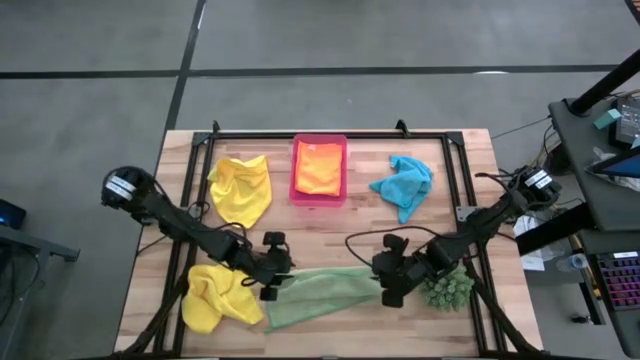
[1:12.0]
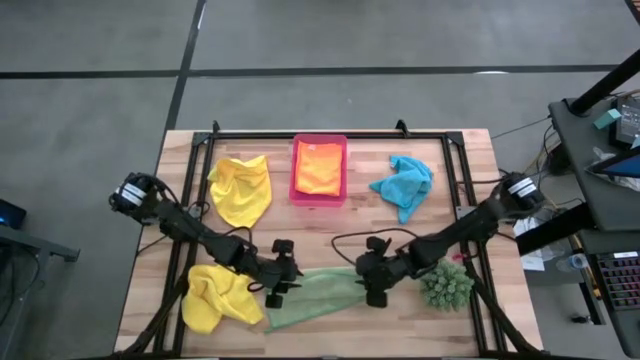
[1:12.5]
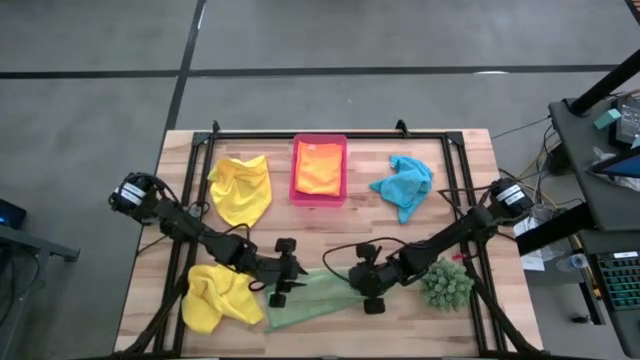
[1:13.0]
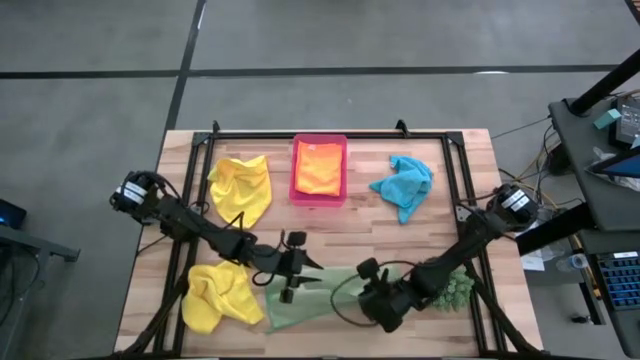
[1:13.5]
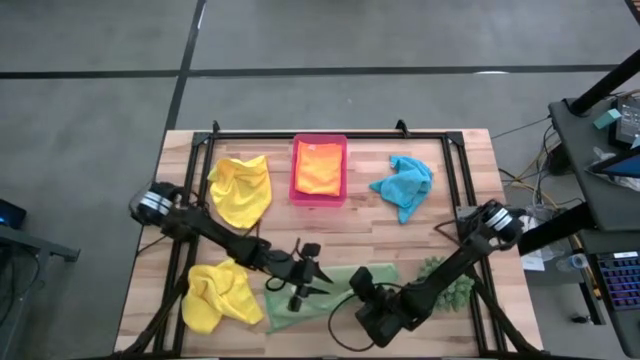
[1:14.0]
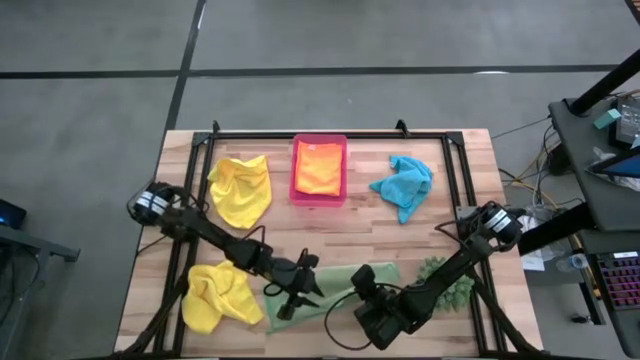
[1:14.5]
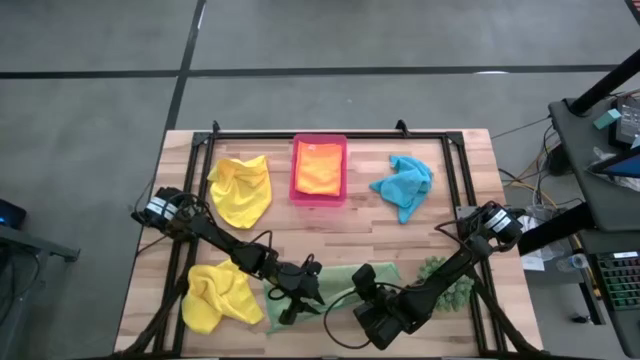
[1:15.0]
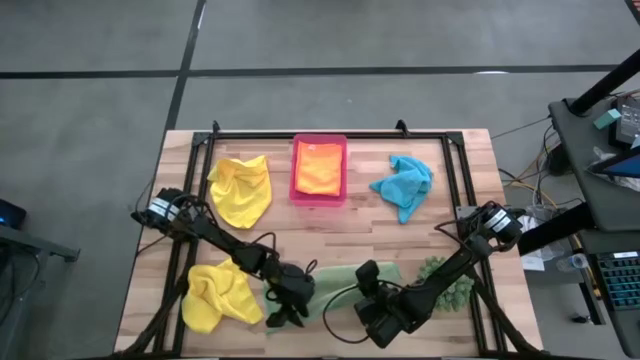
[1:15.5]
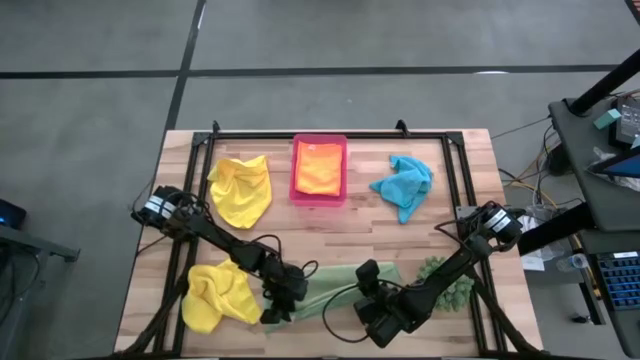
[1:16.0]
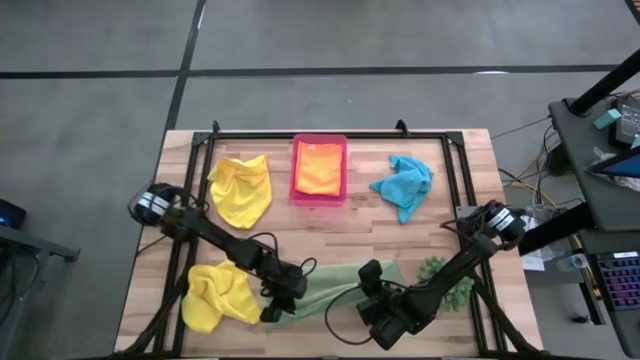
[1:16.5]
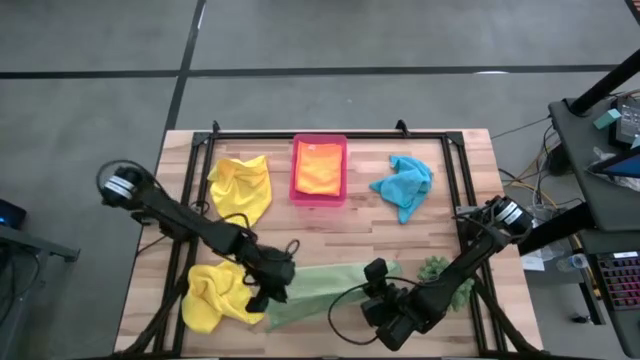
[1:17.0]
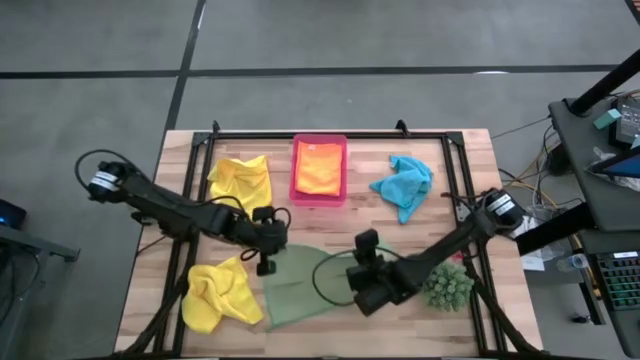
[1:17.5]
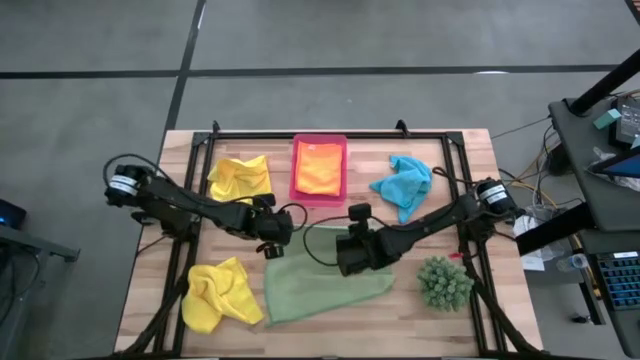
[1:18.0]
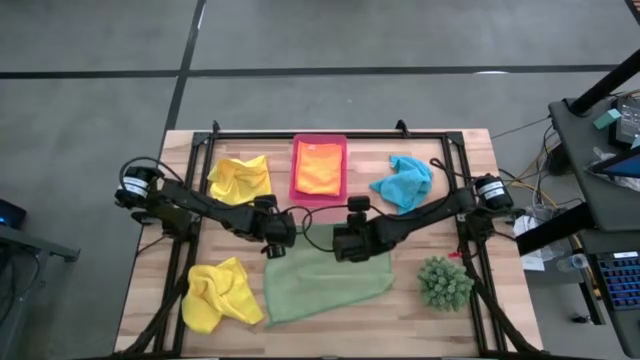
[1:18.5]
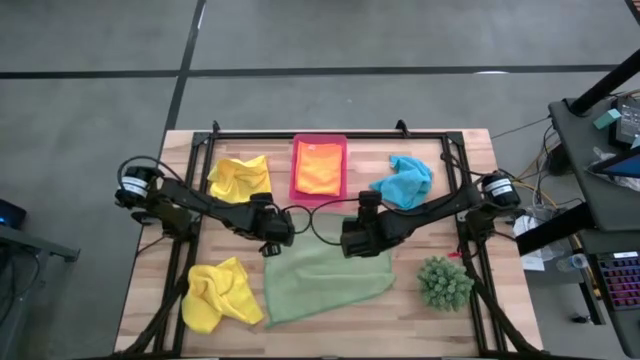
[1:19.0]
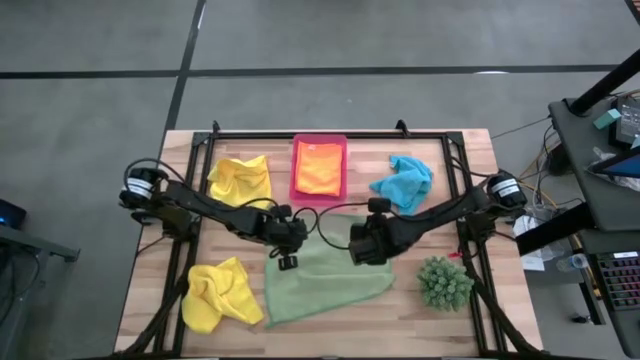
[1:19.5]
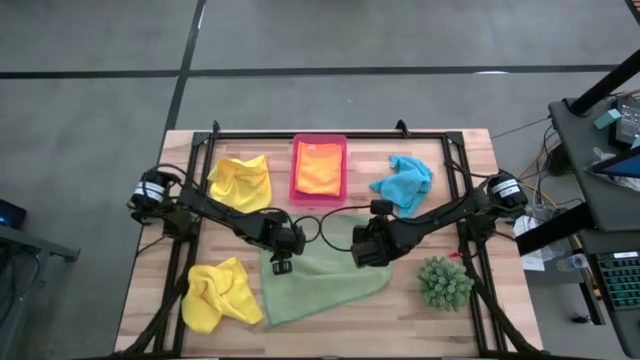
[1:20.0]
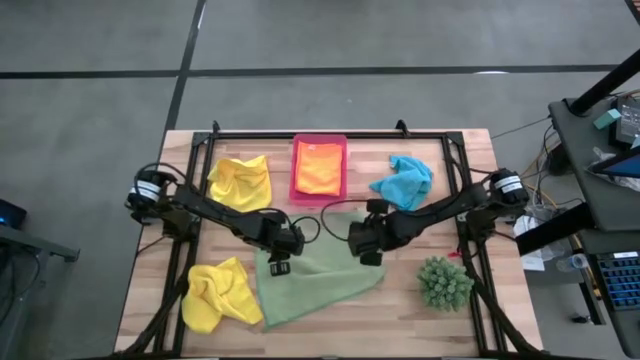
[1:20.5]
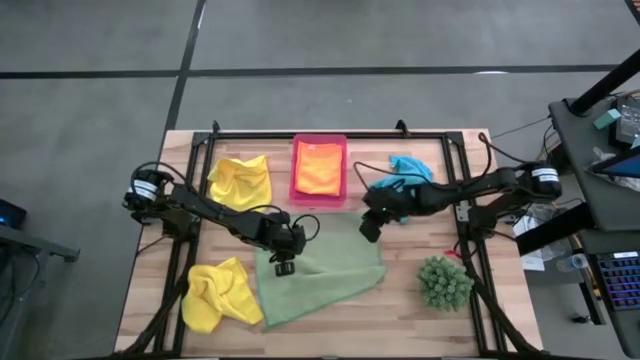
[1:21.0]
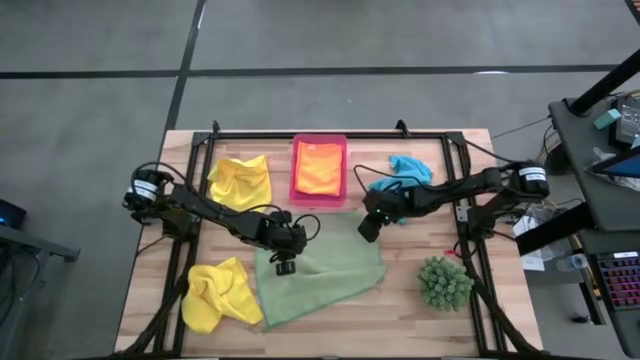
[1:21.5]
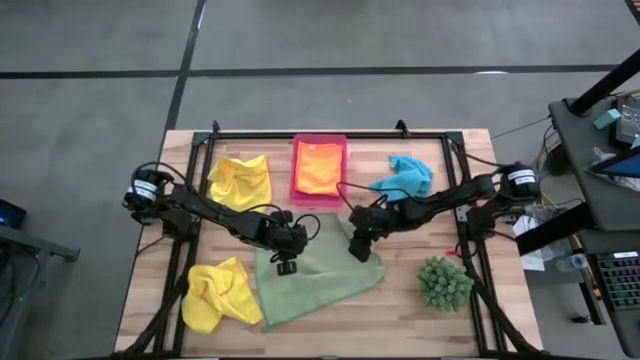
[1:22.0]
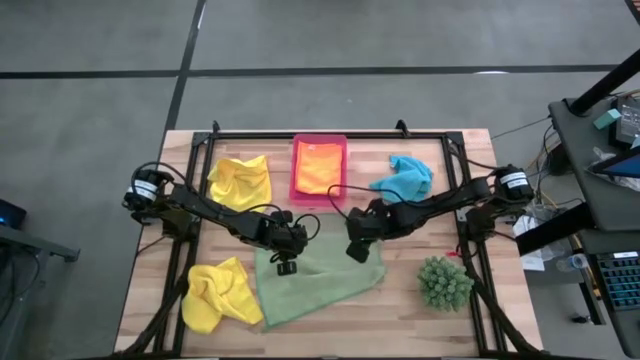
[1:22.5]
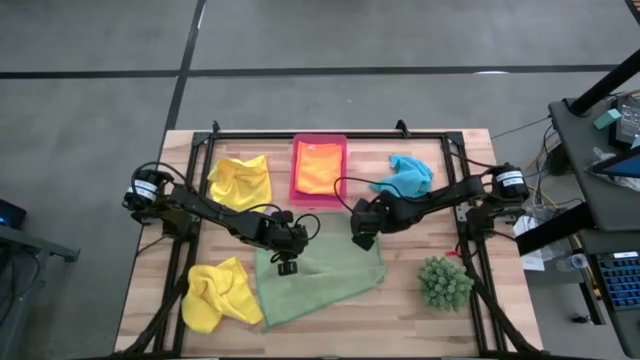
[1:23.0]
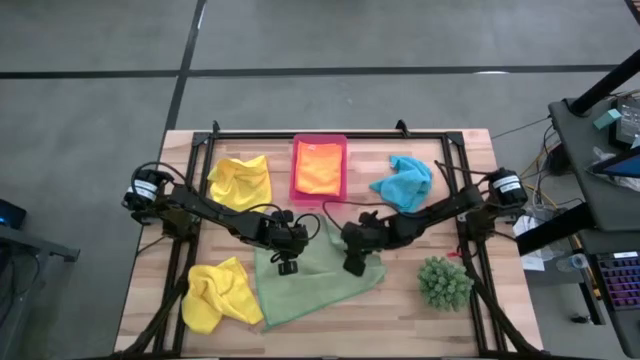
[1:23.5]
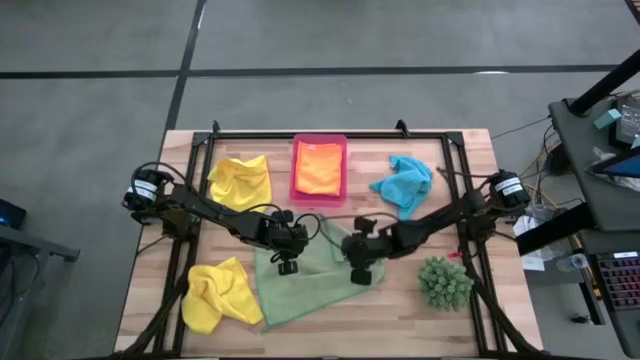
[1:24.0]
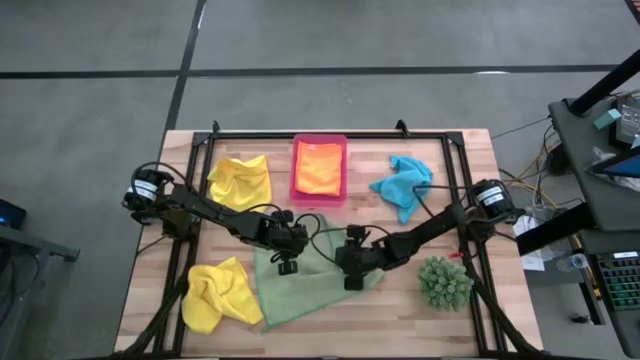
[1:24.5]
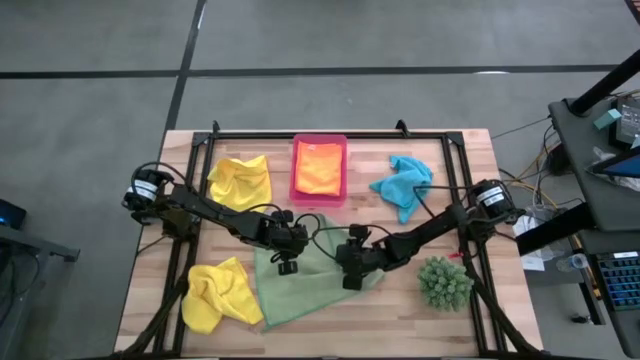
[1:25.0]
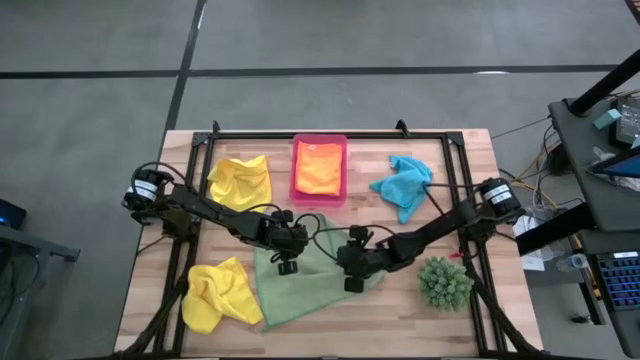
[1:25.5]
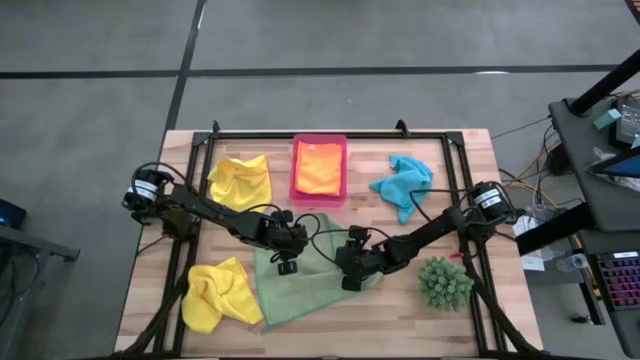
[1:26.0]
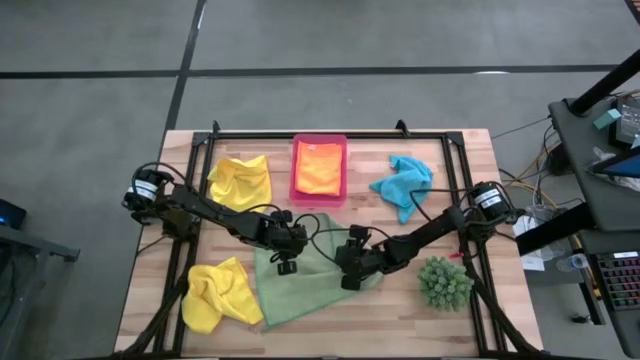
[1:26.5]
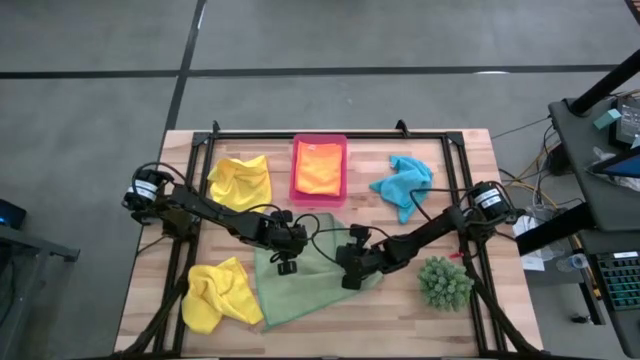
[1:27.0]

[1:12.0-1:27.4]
Task: Fold microfiber towels
Fold the green towel
